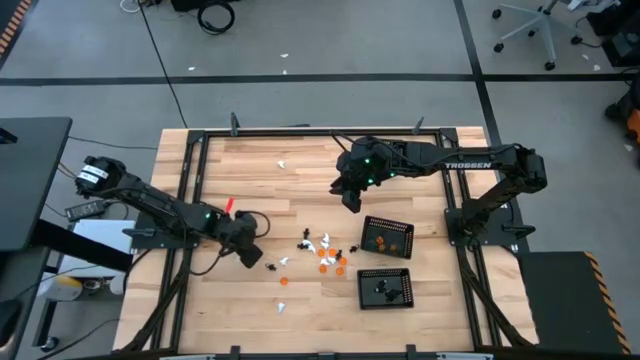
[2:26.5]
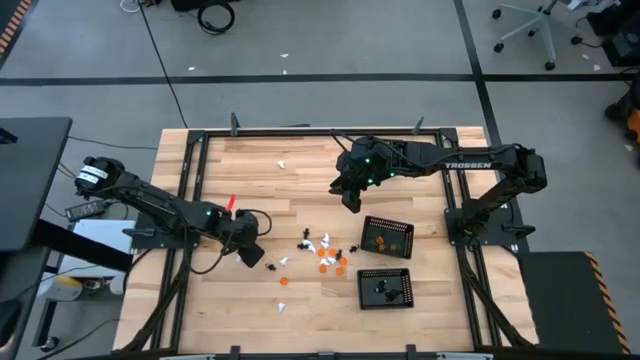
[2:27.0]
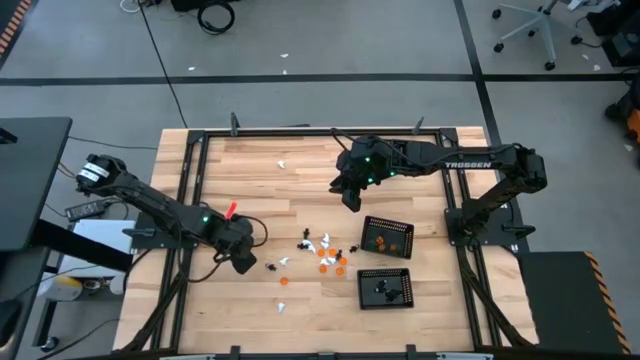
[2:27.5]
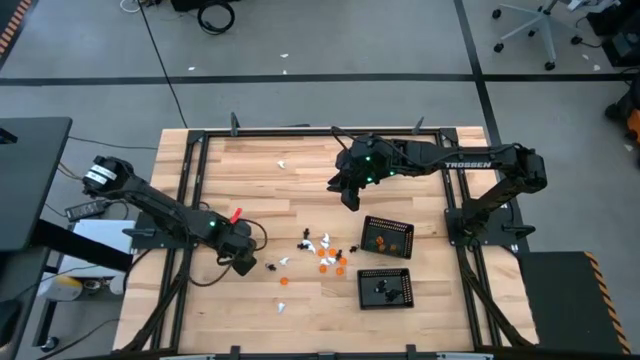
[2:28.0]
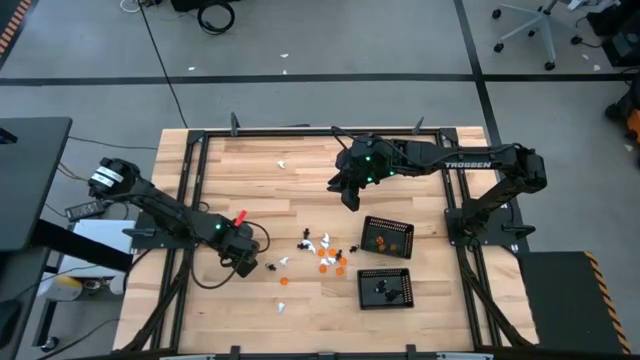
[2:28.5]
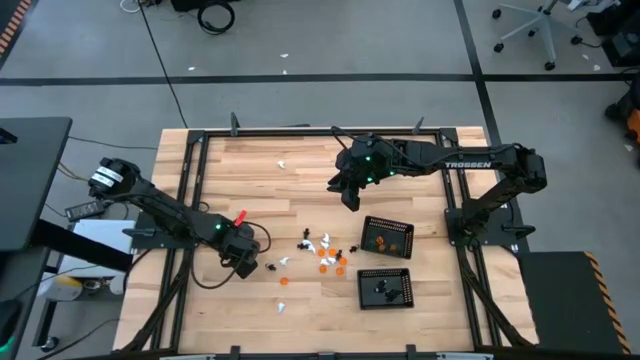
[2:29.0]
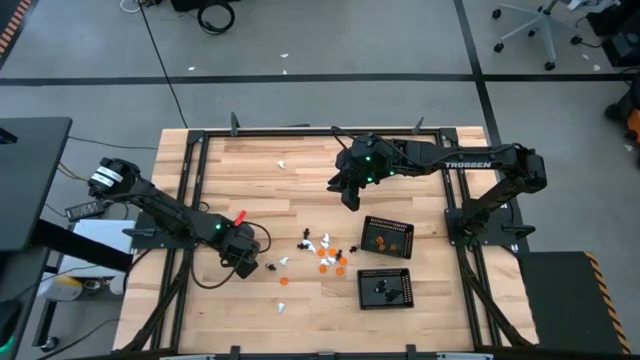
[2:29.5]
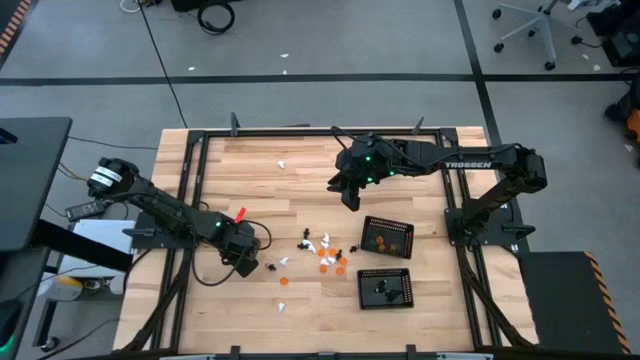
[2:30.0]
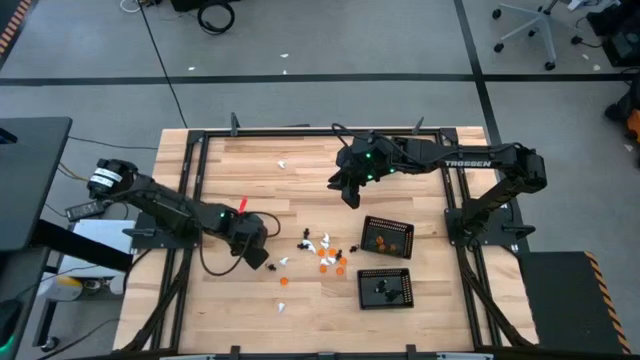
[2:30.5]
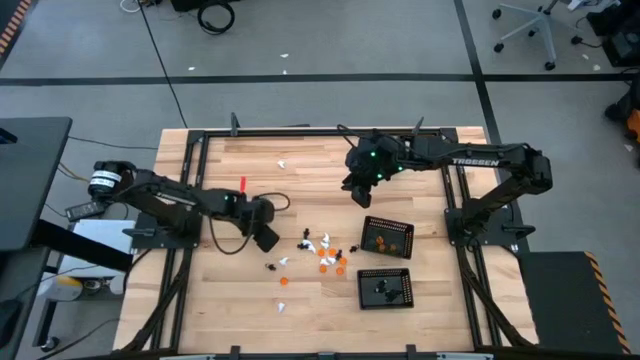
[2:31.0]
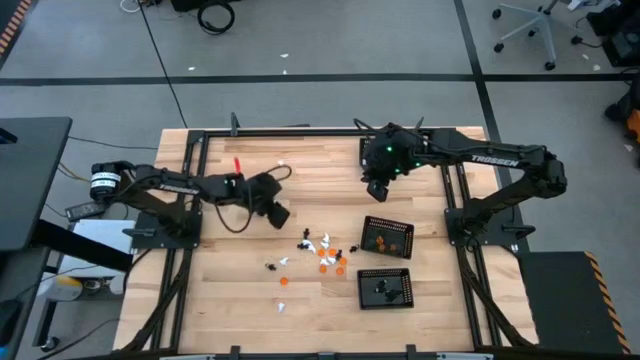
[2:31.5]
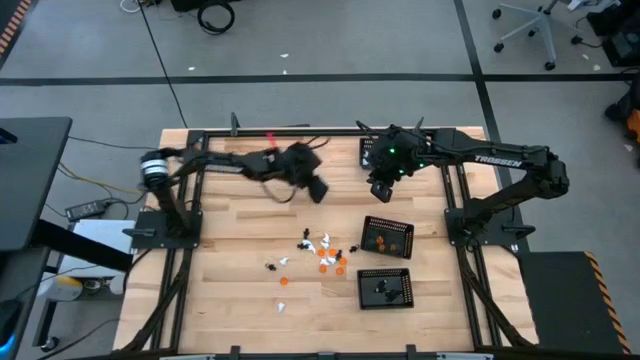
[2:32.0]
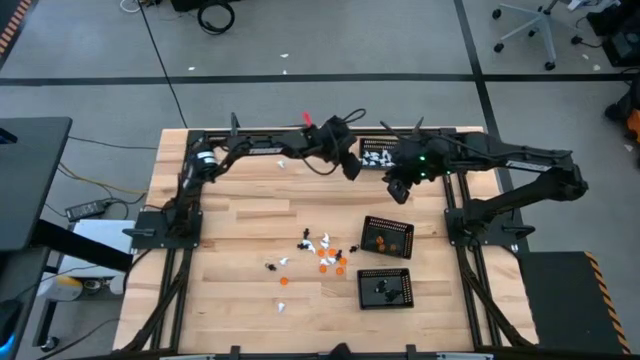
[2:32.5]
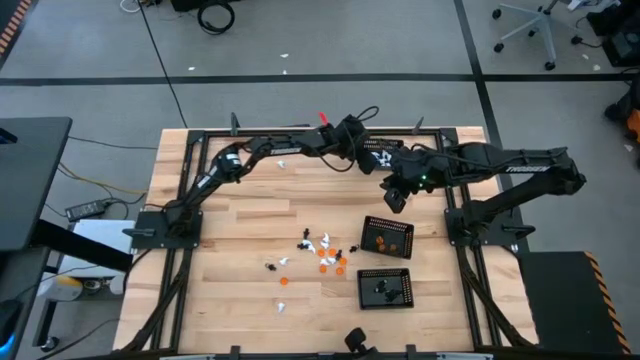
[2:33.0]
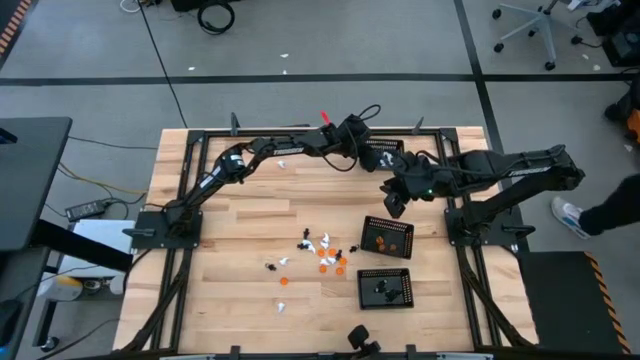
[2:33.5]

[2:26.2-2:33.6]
Task: Sort Halloween decoration
Put the white ghost toy into the top black bin

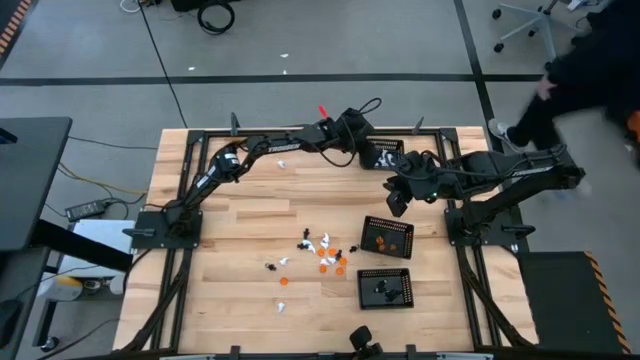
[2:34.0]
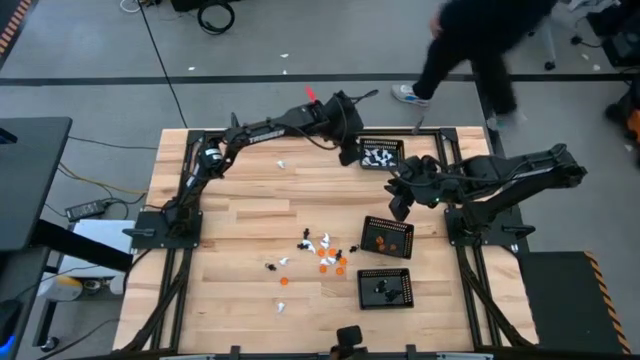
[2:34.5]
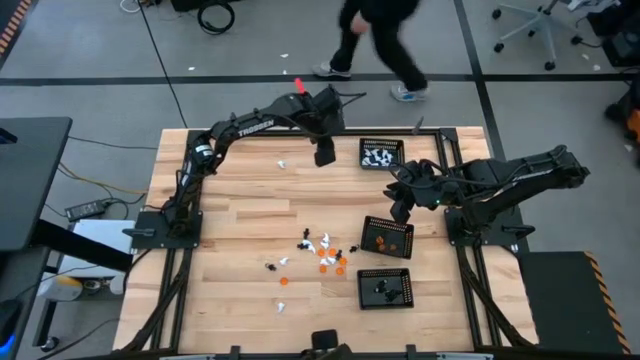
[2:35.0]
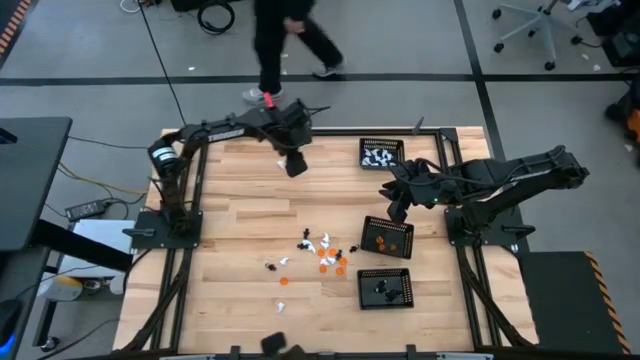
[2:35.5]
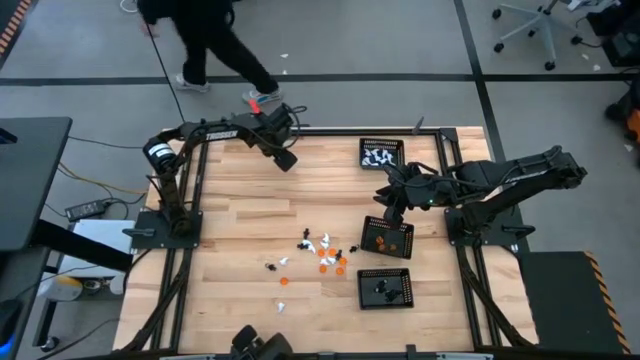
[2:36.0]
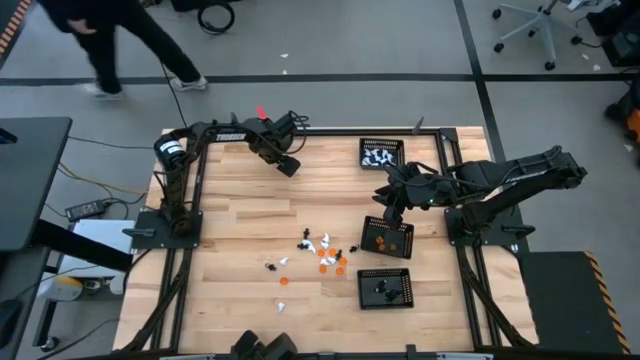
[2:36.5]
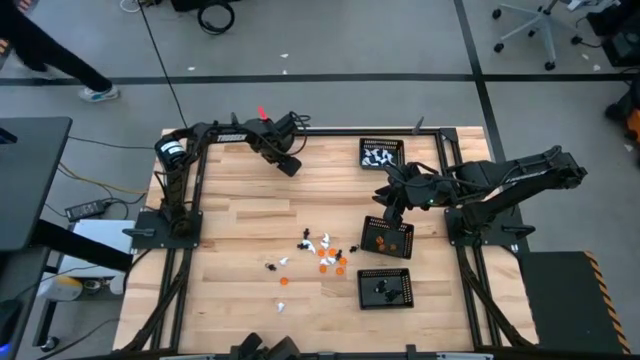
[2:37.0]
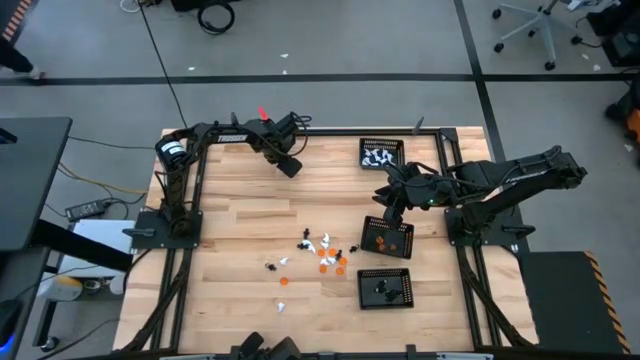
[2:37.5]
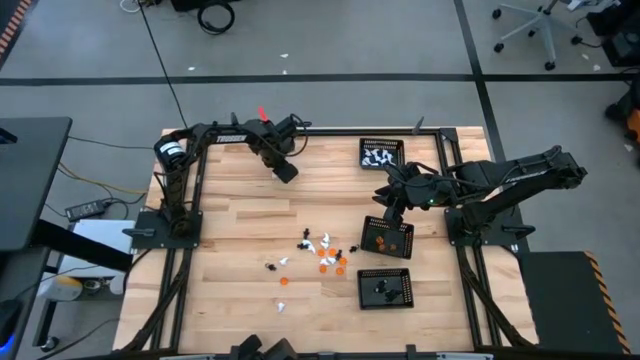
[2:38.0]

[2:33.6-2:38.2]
Put the white ghost toy into the top black bin

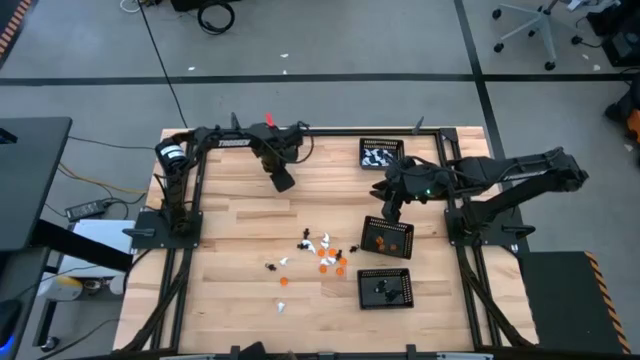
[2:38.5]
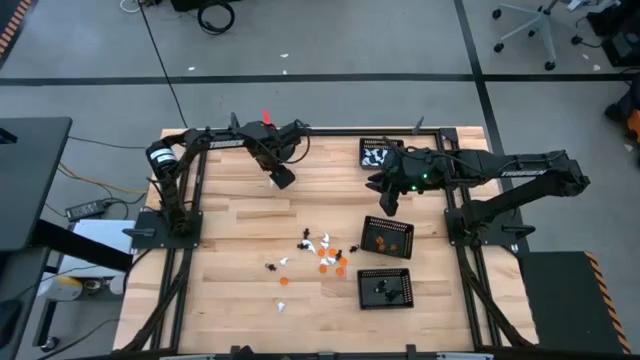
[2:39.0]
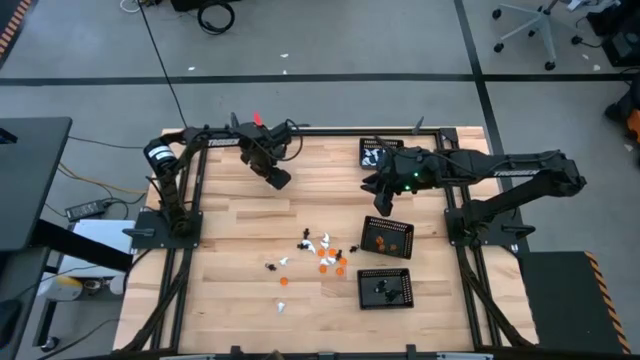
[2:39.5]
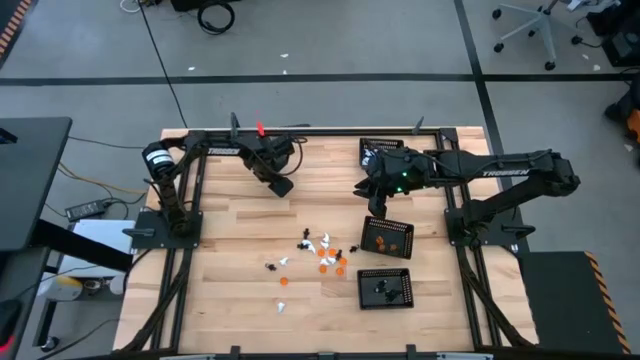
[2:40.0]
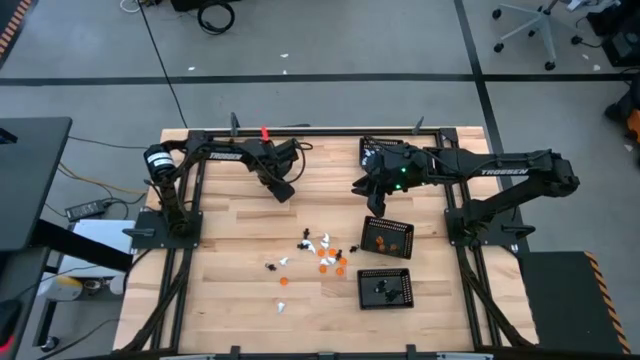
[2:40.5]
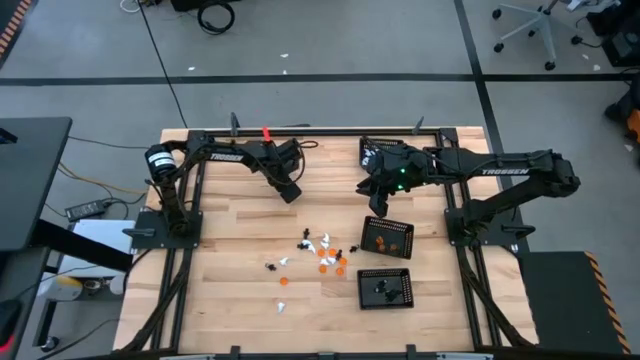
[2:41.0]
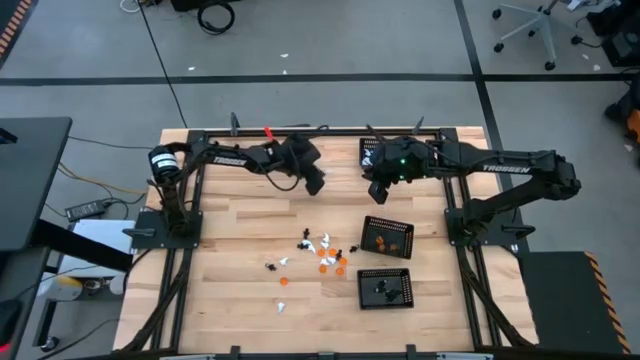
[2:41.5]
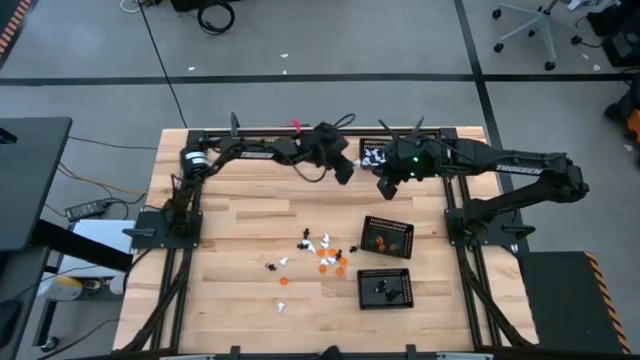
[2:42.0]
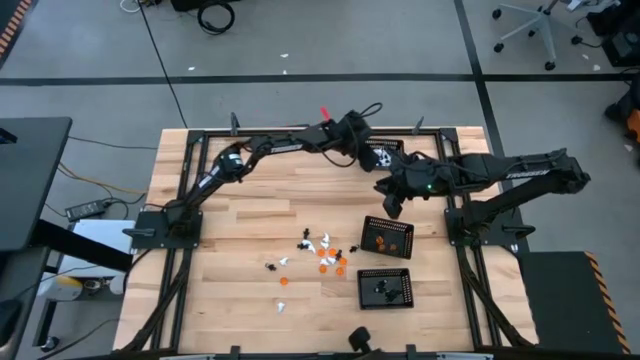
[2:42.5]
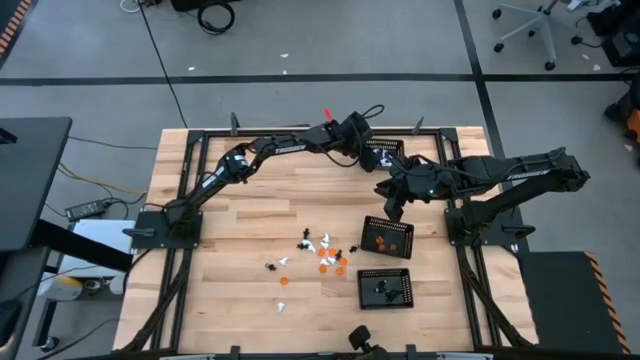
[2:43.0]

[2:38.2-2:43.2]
Put the white ghost toy into the top black bin

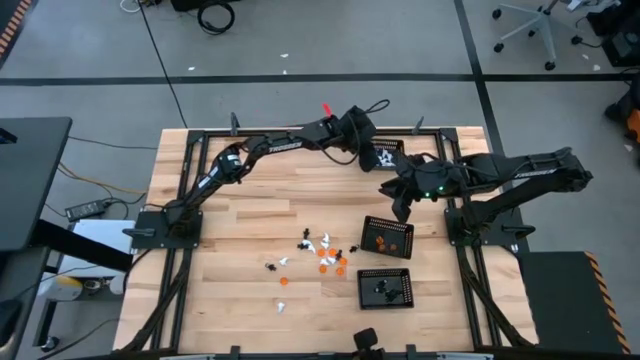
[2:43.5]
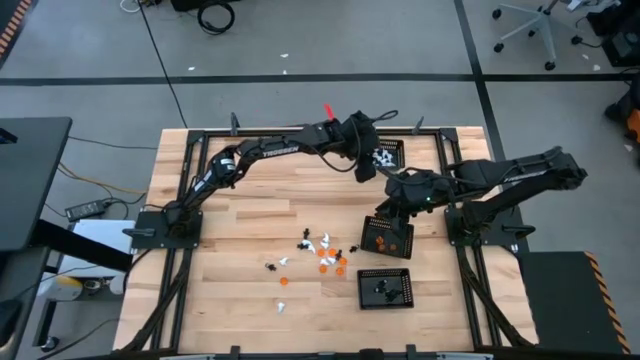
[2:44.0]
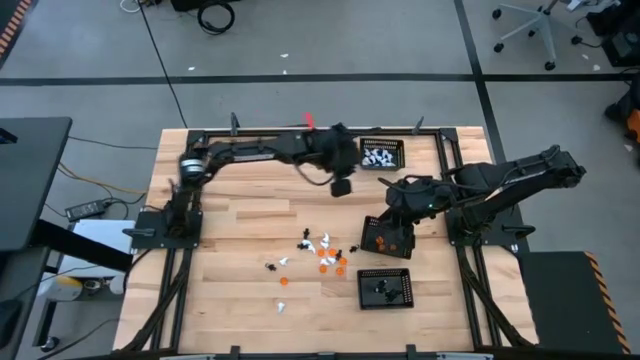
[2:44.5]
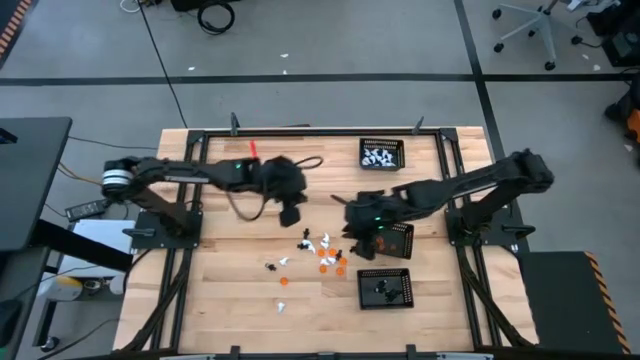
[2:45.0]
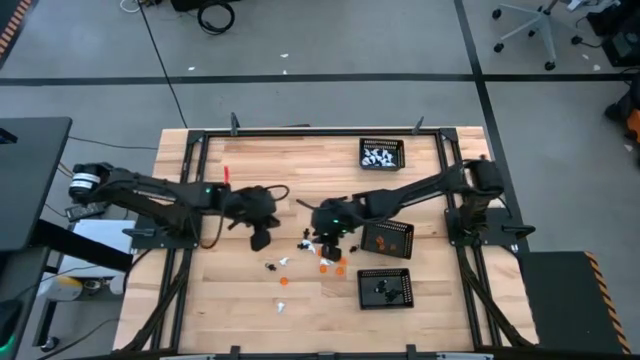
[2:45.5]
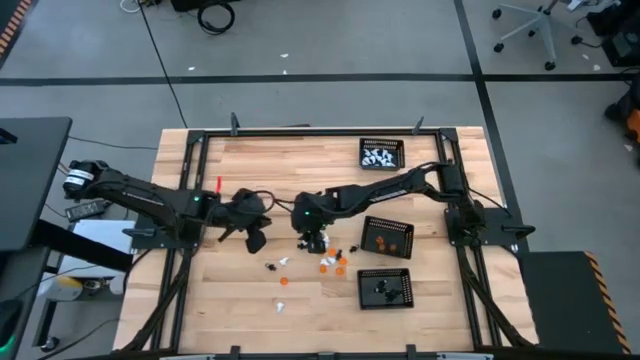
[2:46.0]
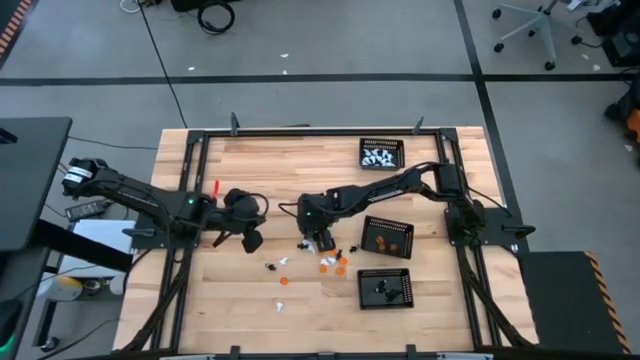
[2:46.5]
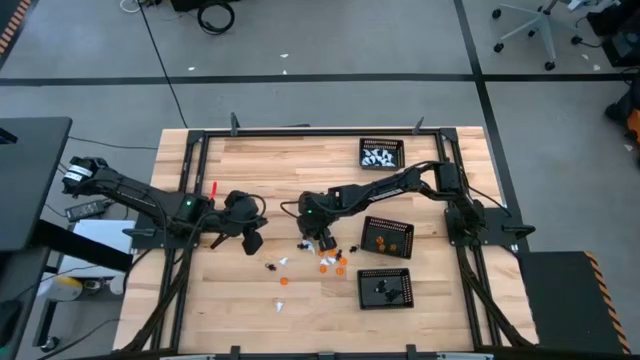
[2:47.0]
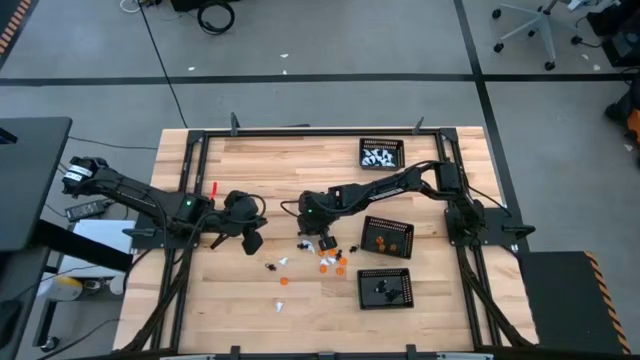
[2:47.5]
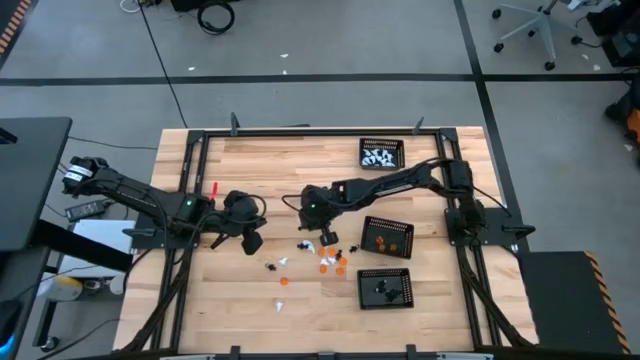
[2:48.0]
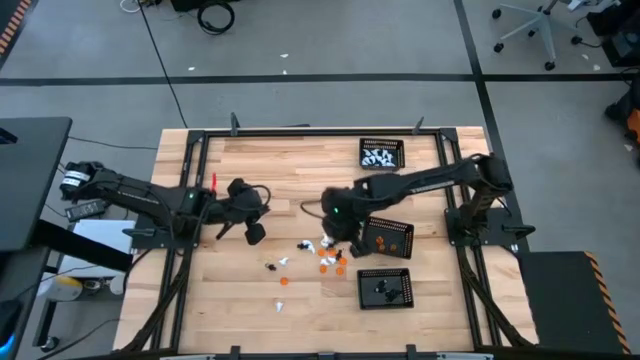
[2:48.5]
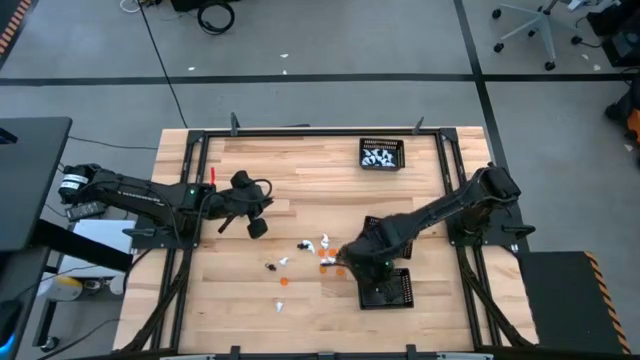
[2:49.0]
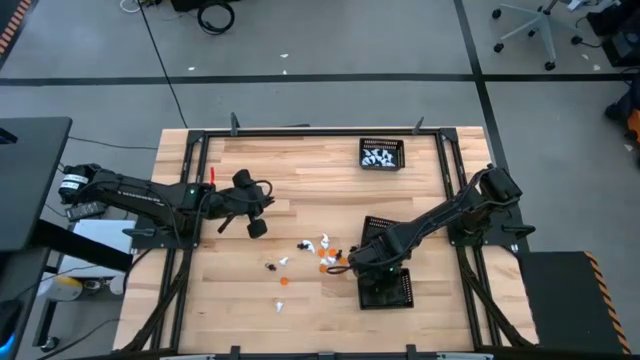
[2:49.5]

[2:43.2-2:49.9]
Put the black skeleton toy into the bottom black bin
